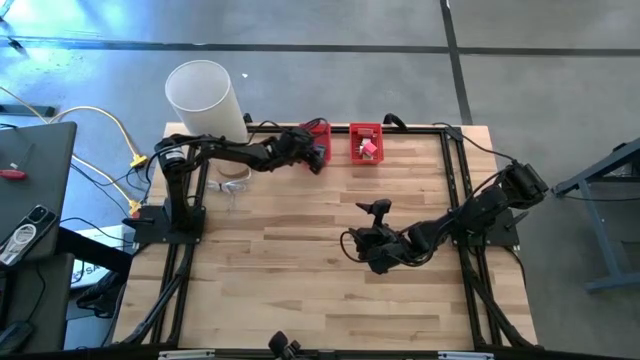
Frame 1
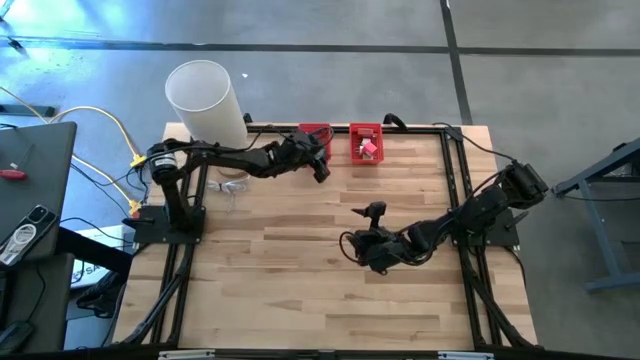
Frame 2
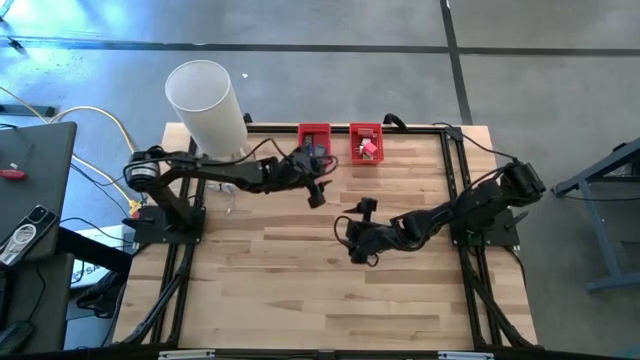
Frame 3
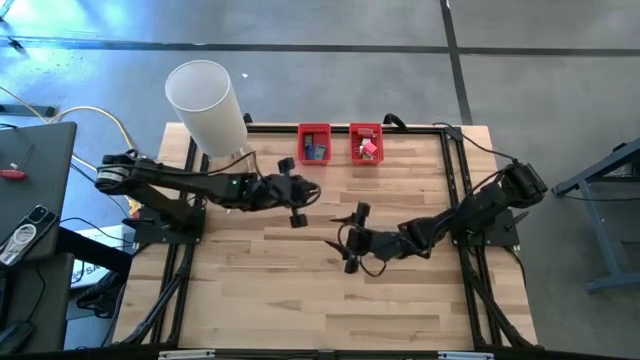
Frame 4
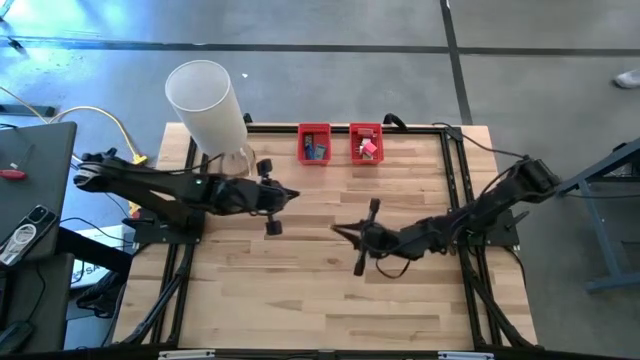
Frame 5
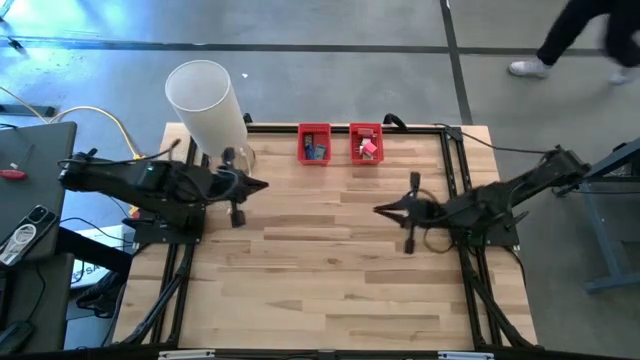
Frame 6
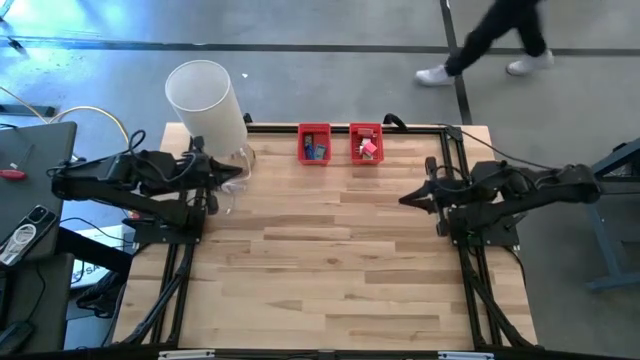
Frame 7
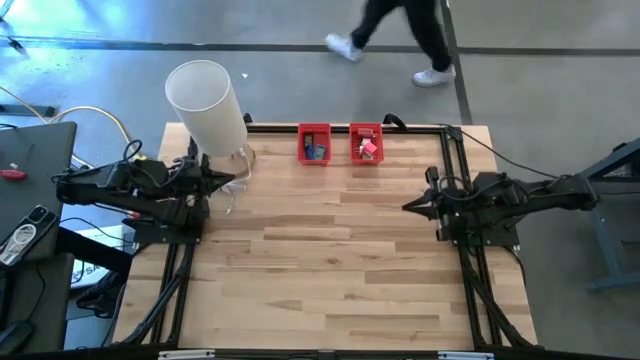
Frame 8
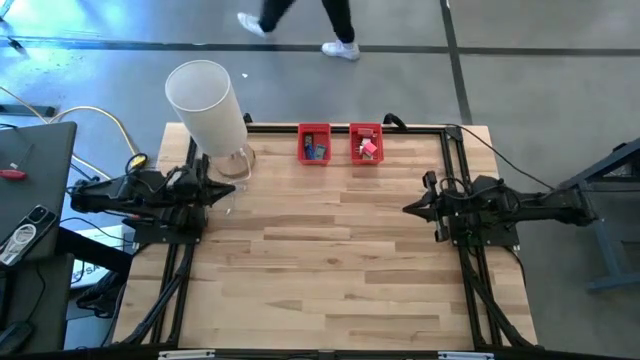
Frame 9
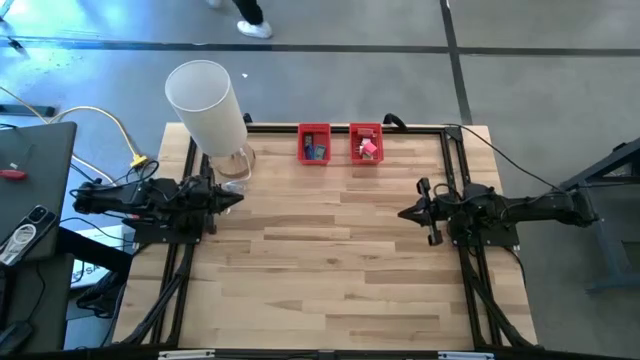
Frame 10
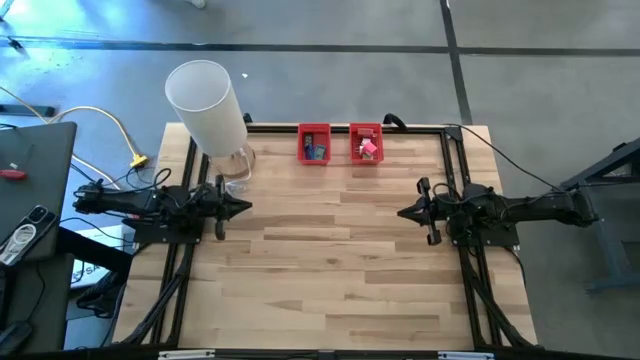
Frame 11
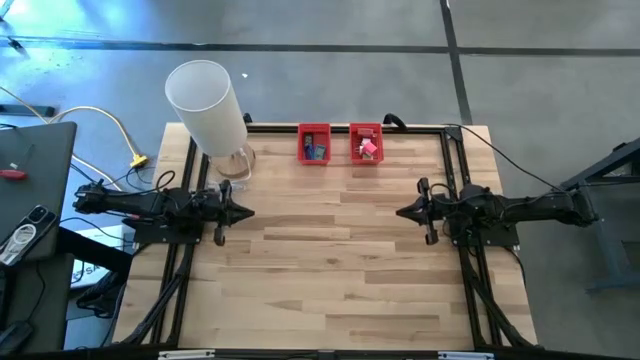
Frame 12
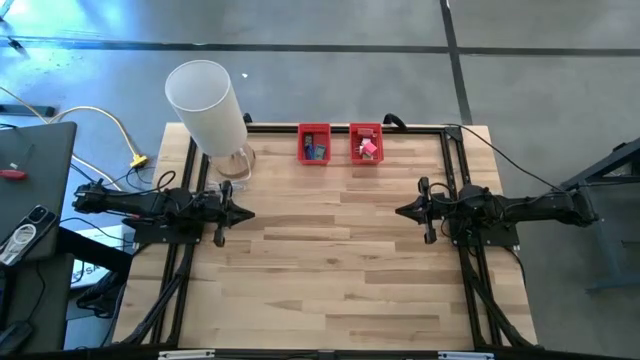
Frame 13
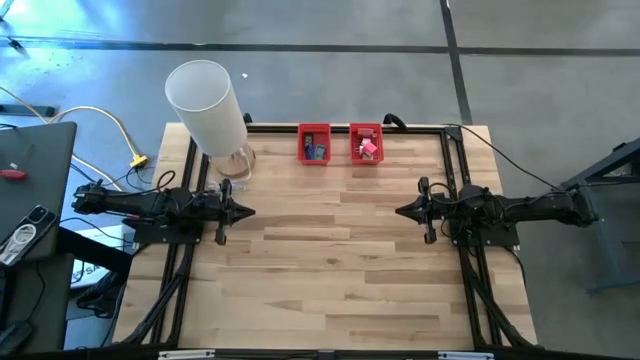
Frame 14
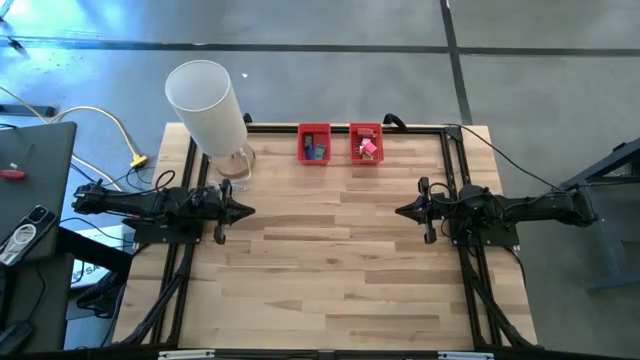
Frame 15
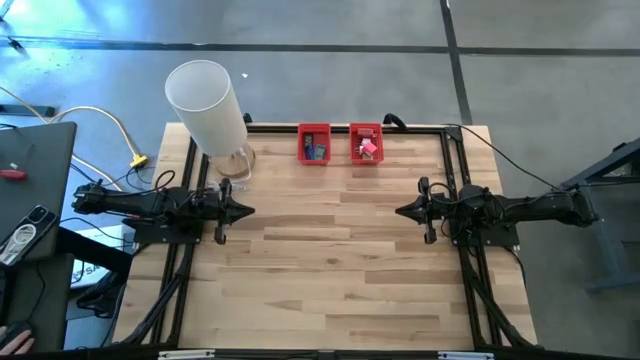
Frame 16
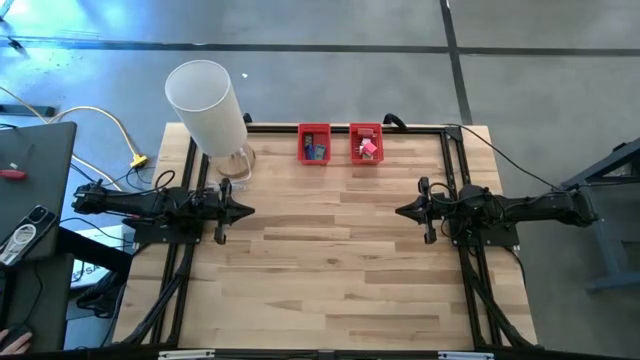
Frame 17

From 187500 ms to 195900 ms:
Task: Pick & Place Office items
Return to Home Position

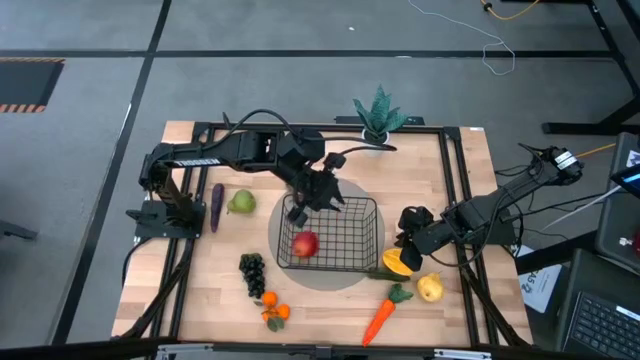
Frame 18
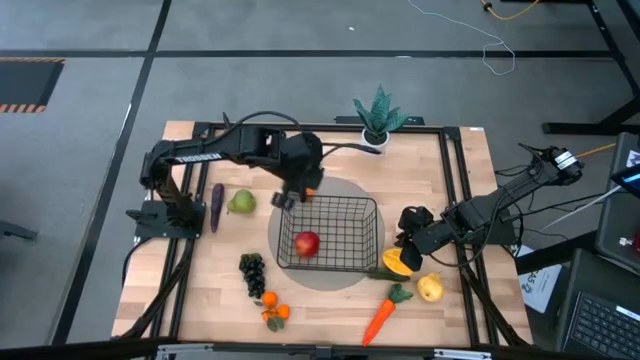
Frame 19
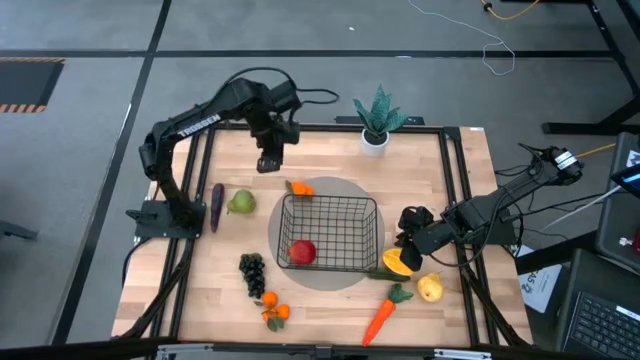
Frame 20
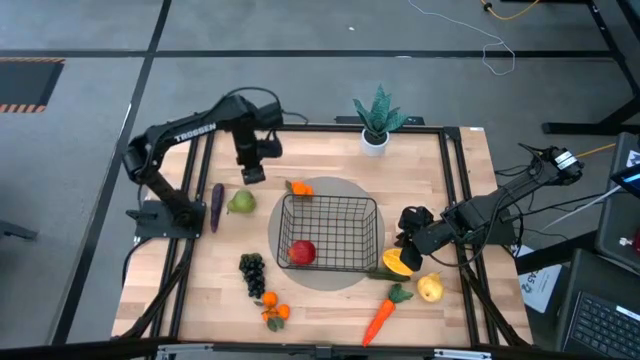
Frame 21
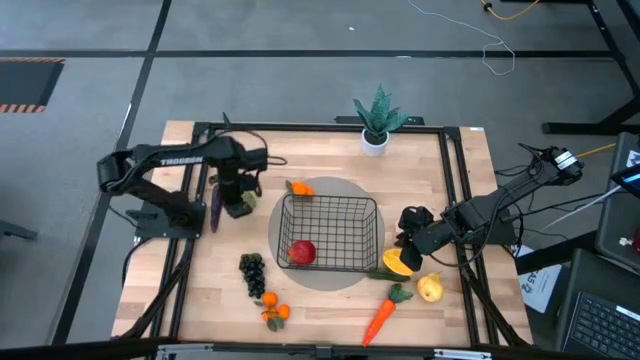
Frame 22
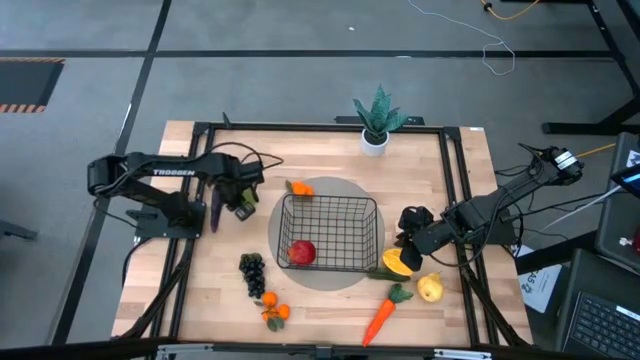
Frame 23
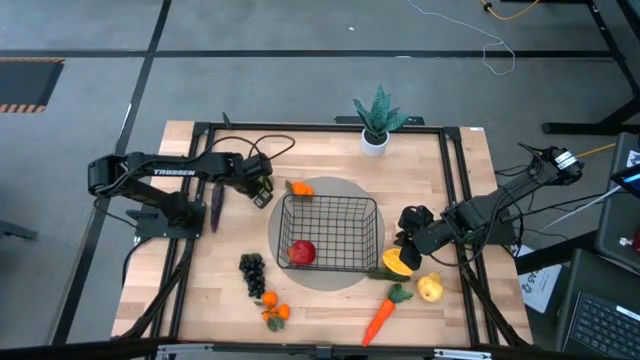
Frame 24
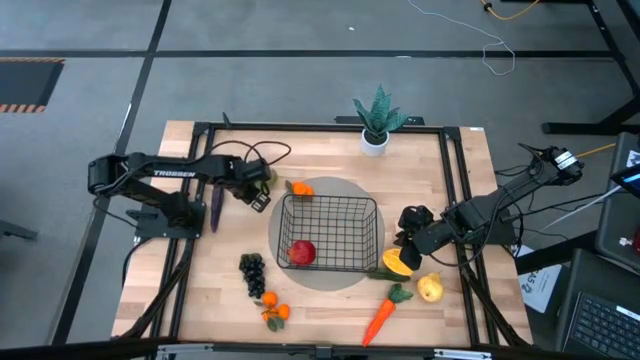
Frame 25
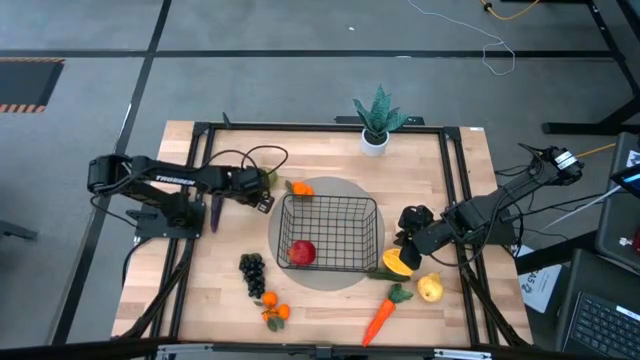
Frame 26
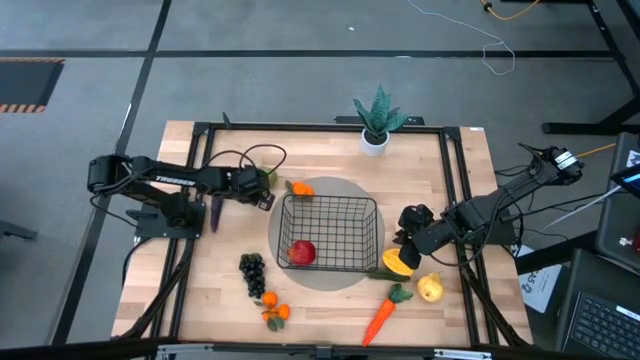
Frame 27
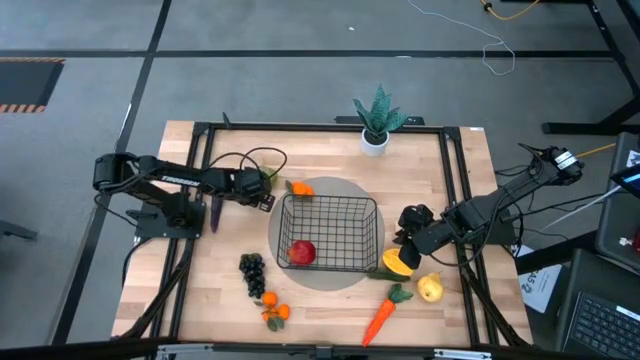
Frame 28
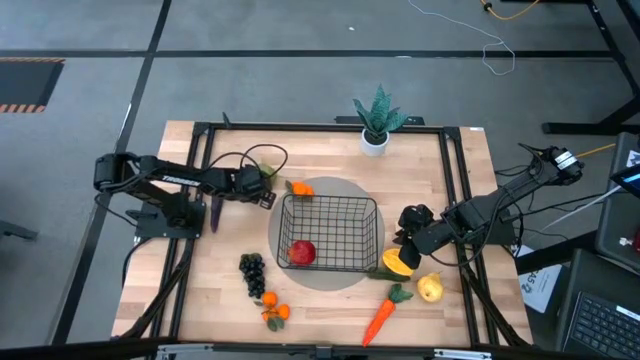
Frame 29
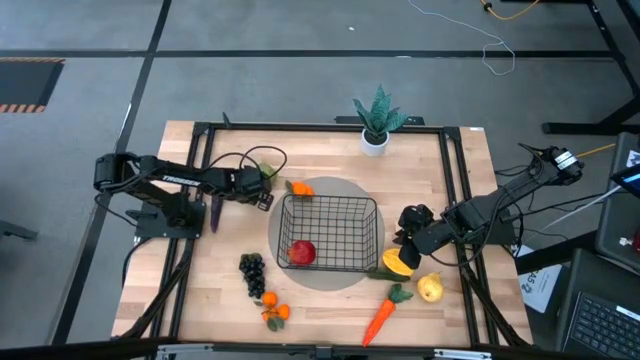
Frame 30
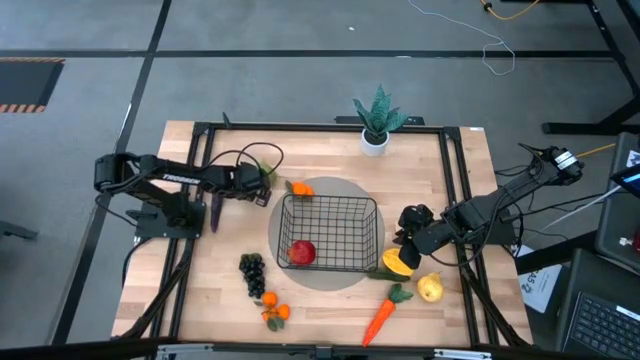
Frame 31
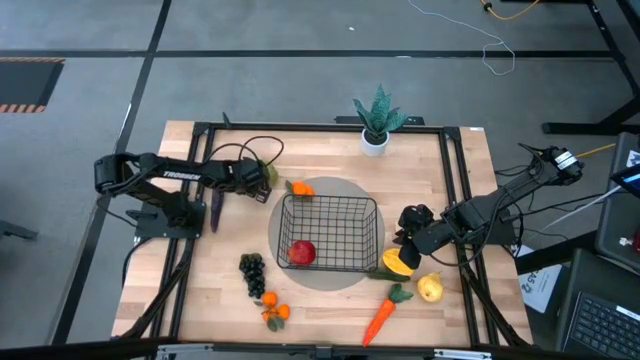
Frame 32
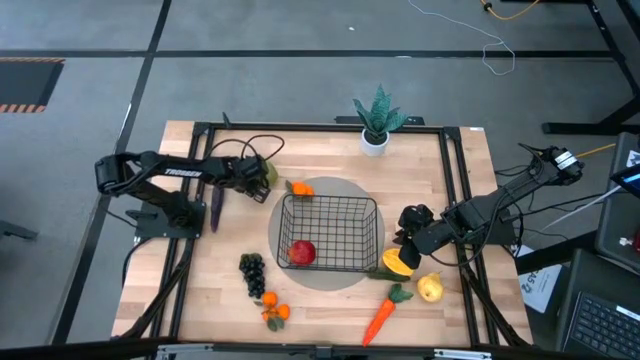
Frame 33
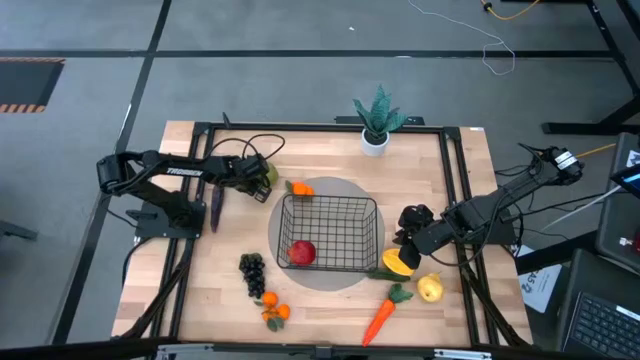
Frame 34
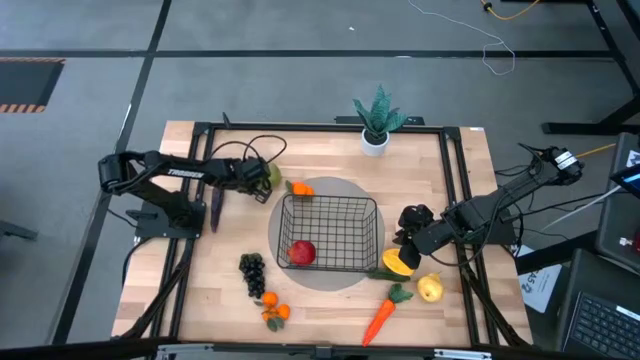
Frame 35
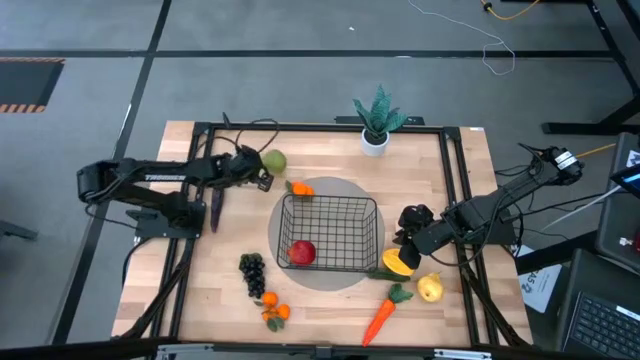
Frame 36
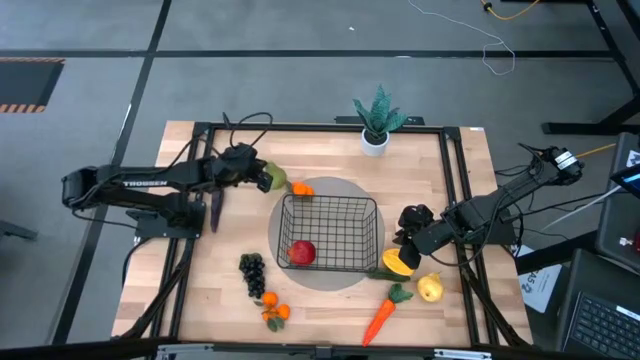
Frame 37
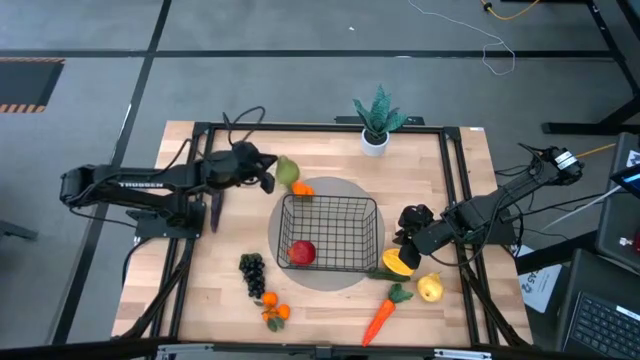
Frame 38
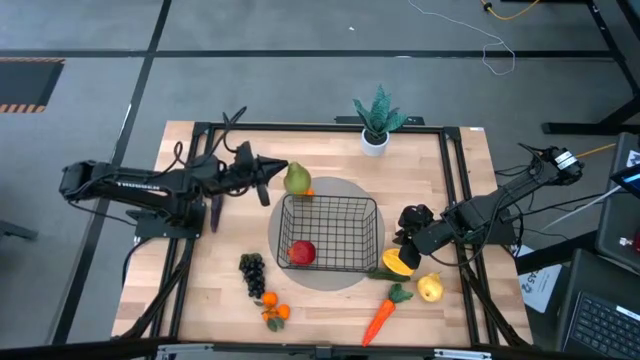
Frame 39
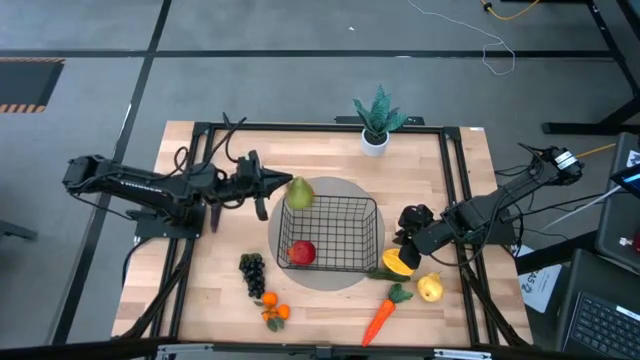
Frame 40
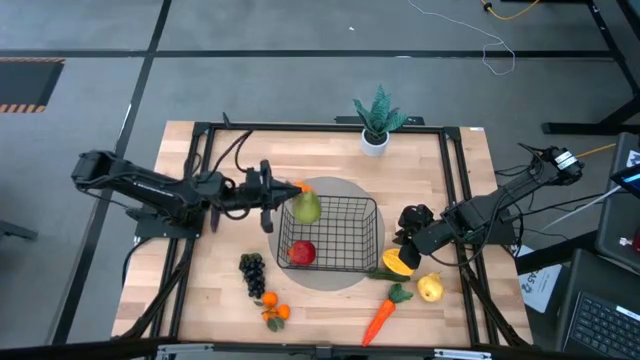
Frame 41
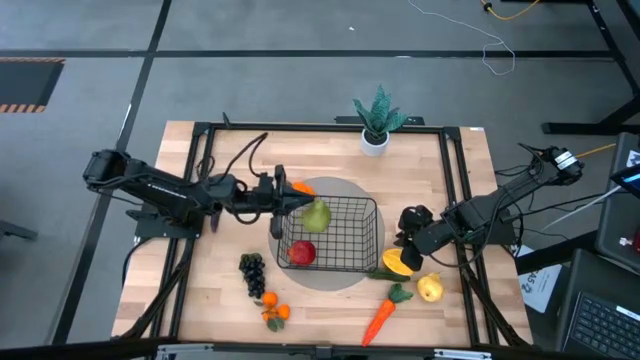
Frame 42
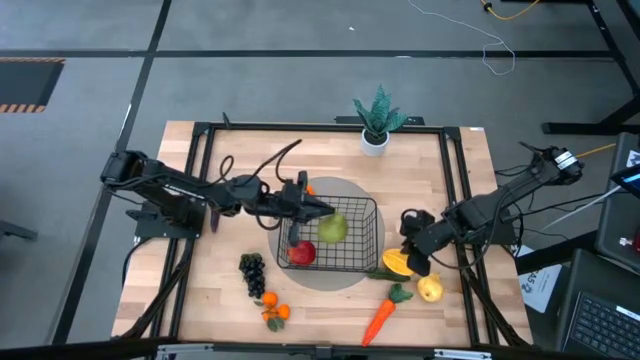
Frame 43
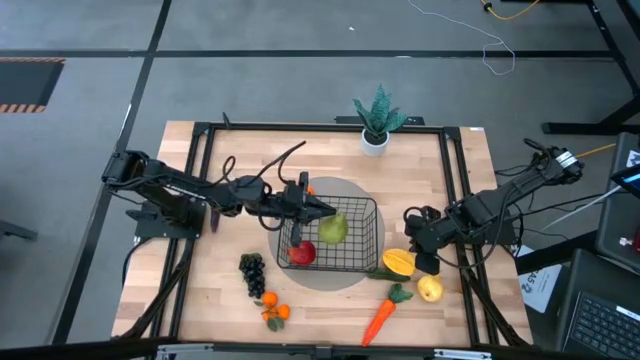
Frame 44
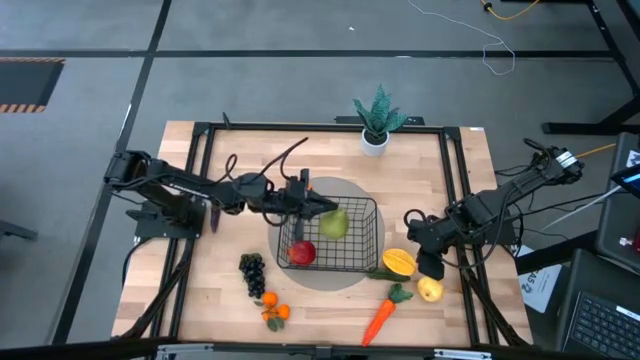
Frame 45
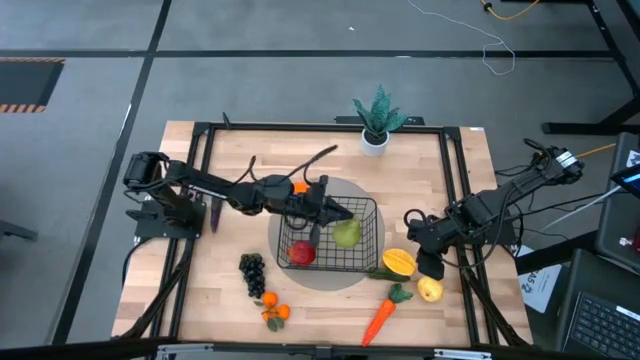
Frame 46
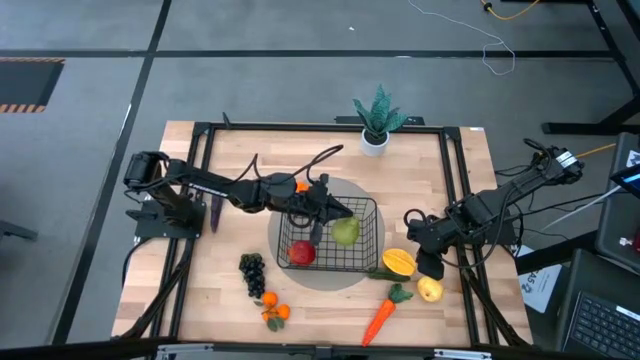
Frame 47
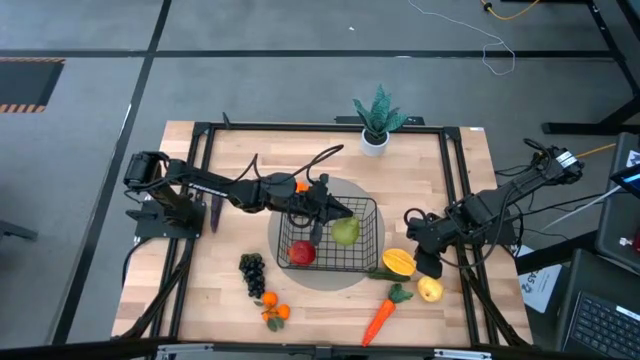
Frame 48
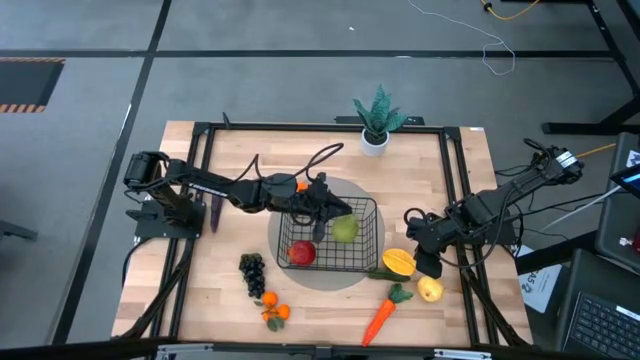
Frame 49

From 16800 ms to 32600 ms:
Task: Build produce basket
Put the green pear into the black wire basket
